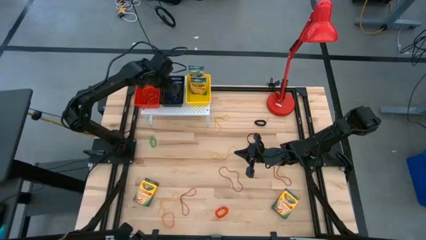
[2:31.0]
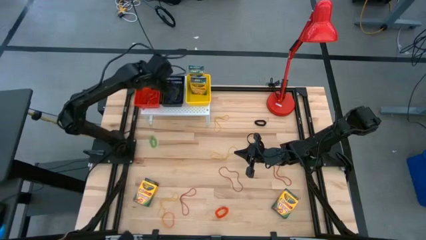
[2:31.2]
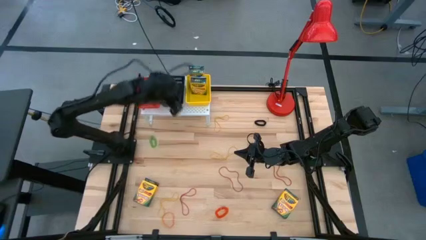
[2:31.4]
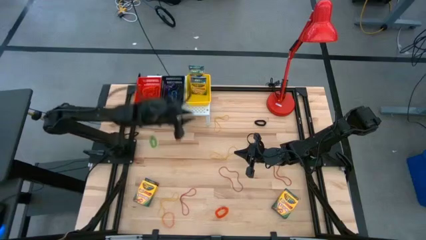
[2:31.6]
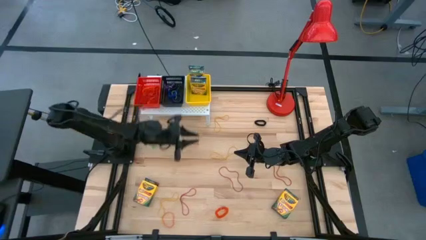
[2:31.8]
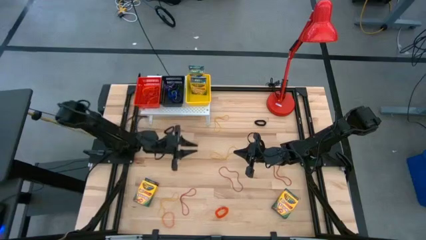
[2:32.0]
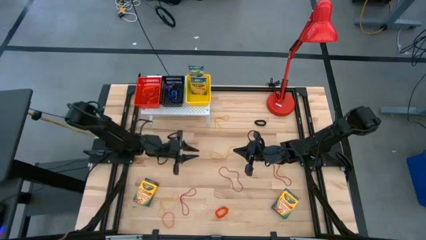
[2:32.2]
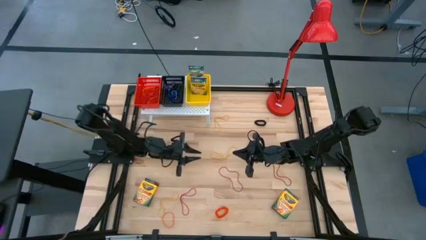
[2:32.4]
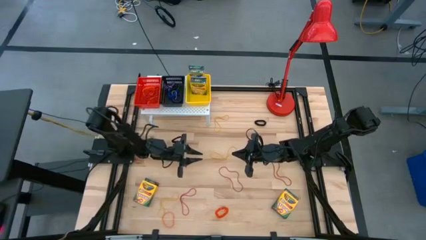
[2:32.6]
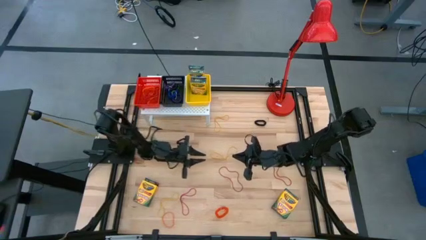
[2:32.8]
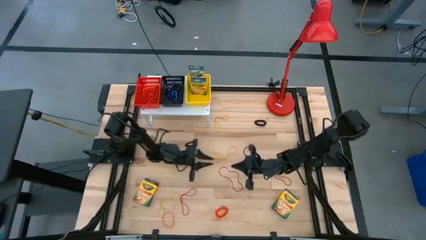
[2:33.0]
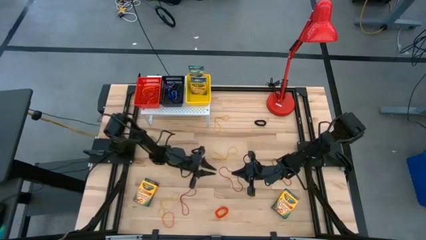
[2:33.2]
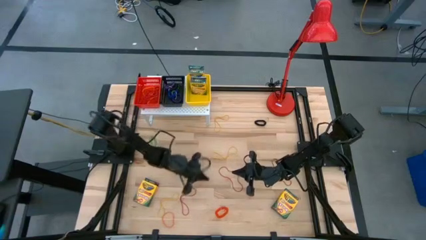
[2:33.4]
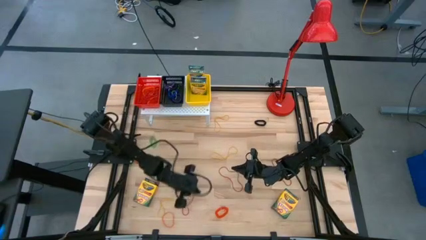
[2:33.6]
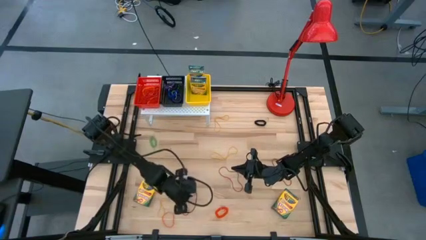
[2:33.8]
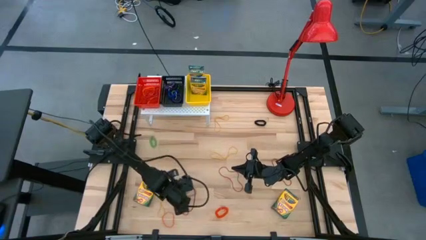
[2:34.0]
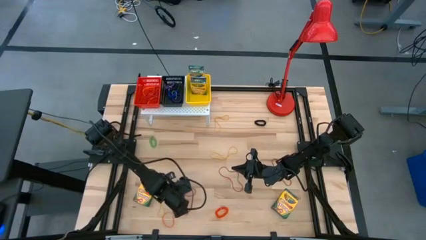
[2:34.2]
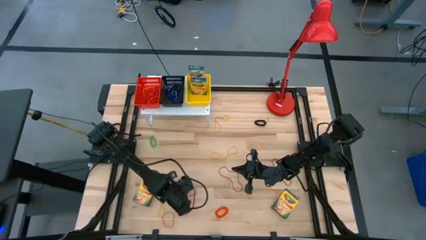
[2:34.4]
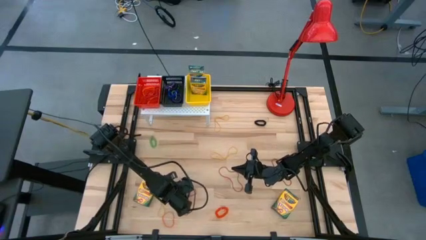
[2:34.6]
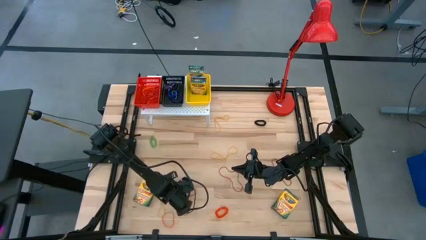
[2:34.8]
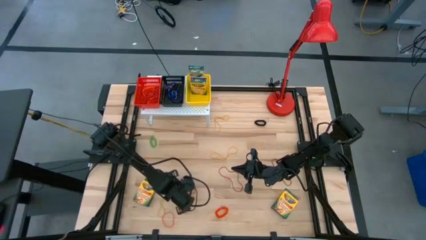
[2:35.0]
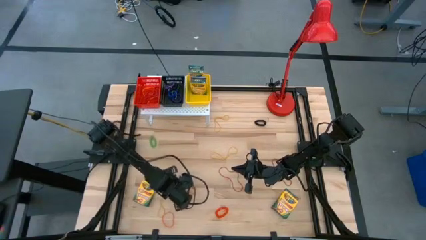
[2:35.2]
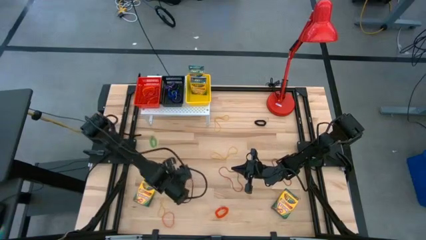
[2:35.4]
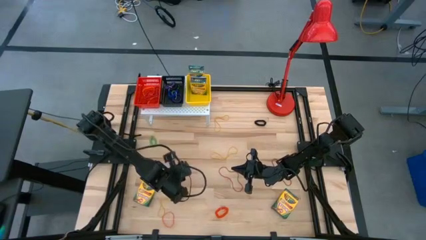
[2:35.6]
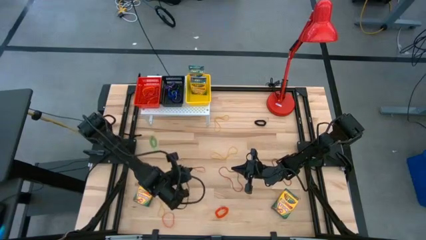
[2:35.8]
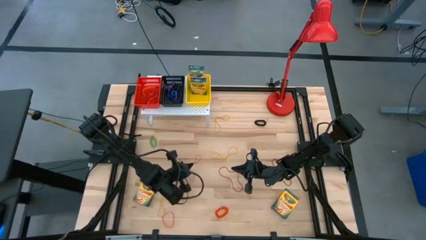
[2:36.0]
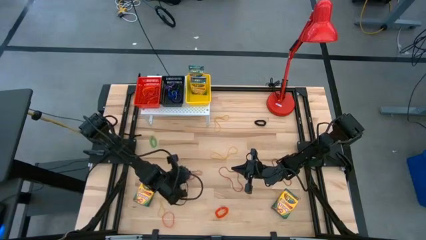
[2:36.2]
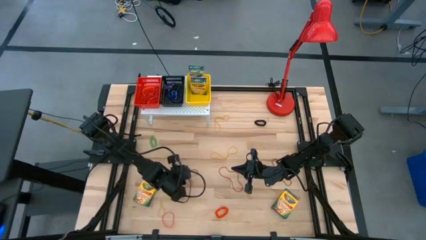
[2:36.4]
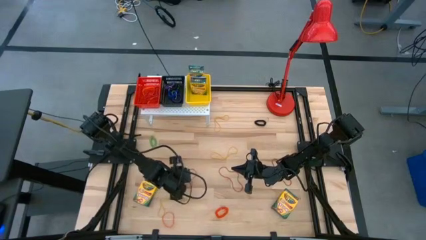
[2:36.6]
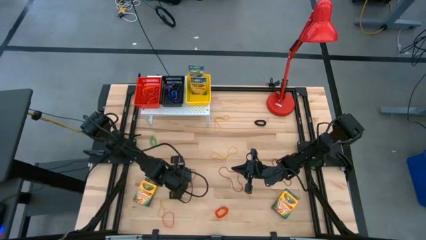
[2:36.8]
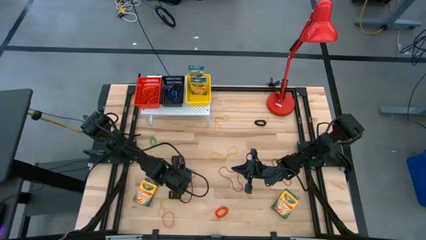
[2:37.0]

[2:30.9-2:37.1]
Task: Pick & Place Office Desk Supplies
Put the red rubber band into the red bin on the shelf

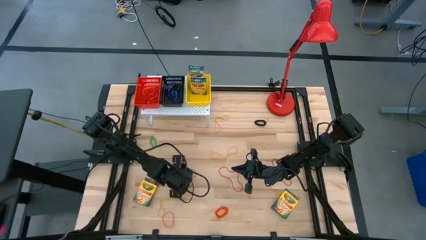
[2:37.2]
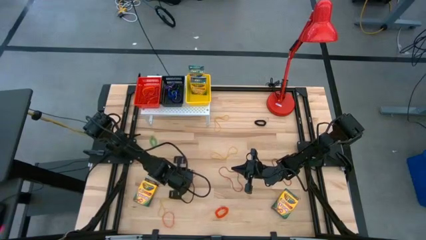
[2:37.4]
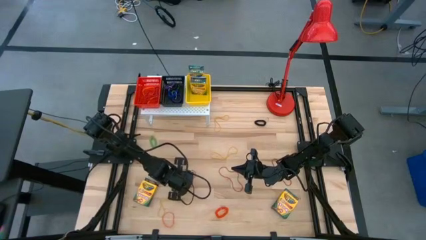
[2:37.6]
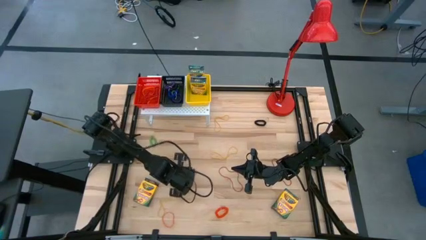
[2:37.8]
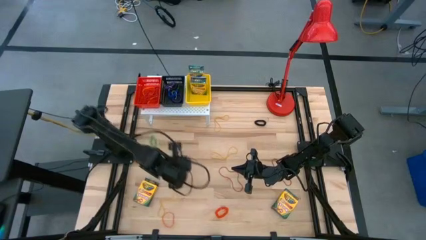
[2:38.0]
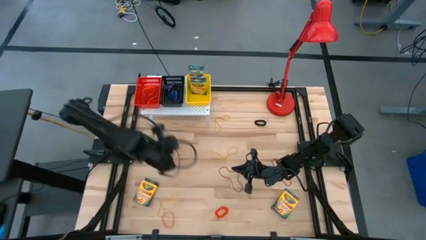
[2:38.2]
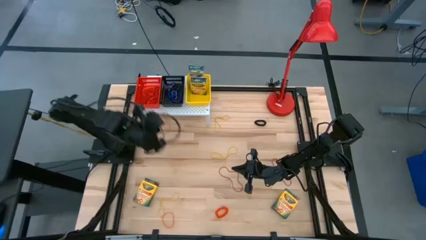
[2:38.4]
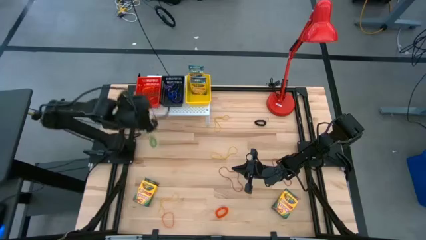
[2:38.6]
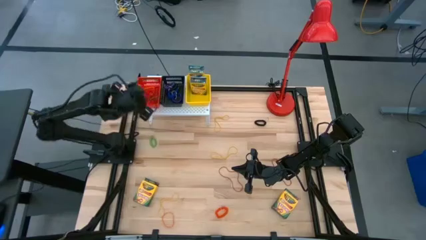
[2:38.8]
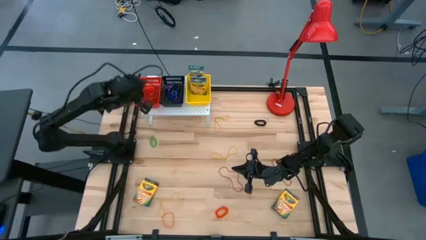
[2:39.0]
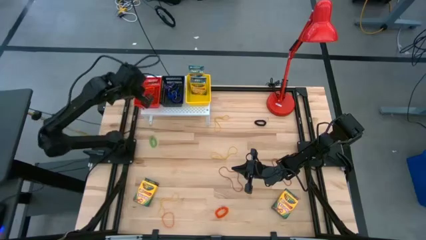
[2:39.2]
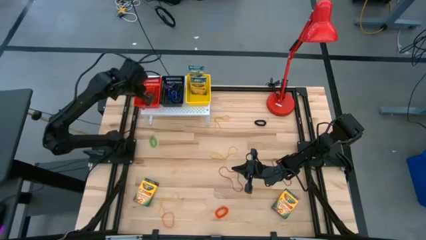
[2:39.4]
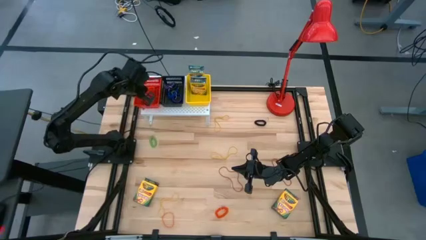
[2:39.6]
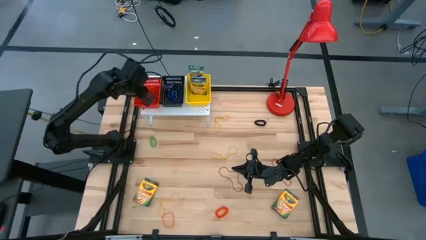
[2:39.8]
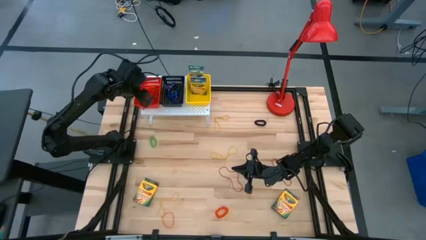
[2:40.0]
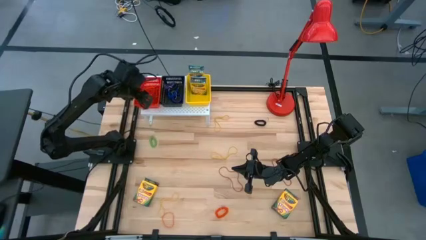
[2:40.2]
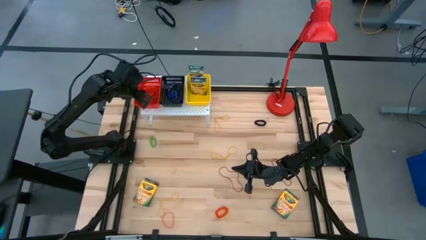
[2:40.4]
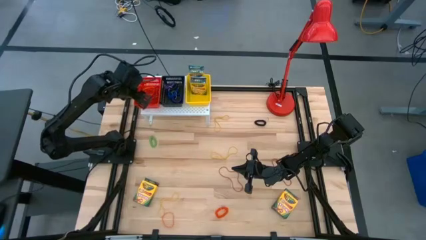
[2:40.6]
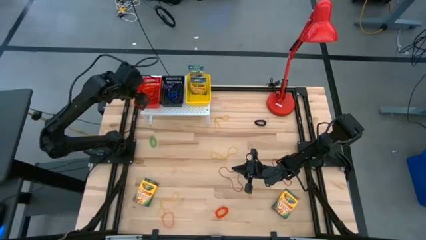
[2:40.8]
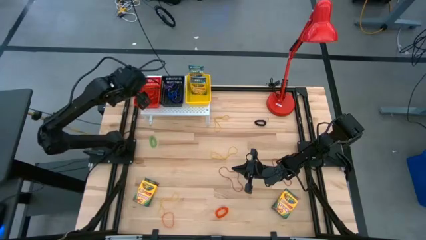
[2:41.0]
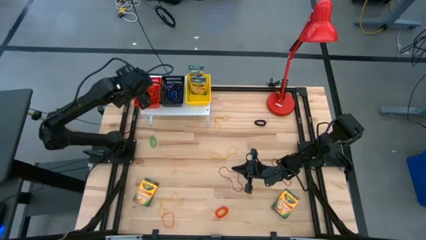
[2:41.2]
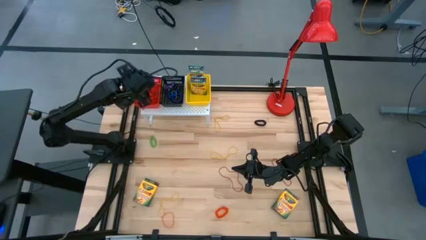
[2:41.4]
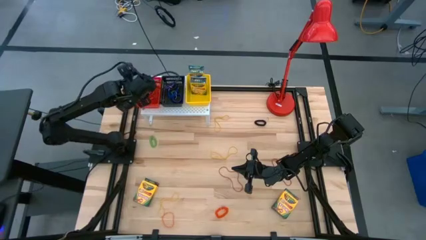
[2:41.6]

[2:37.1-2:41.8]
Put the red rubber band into the red bin on the shelf

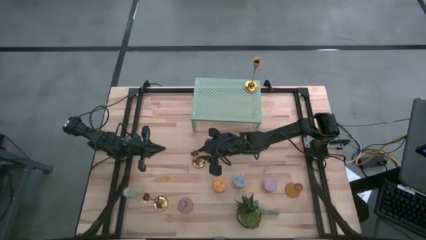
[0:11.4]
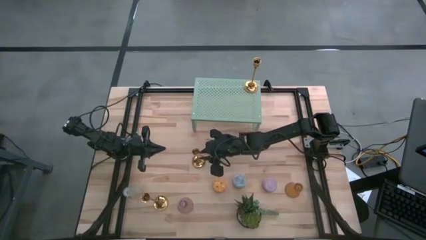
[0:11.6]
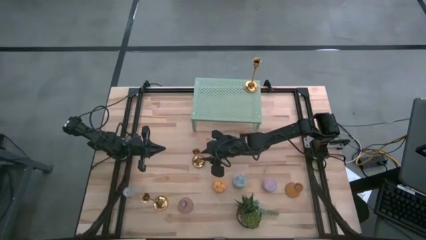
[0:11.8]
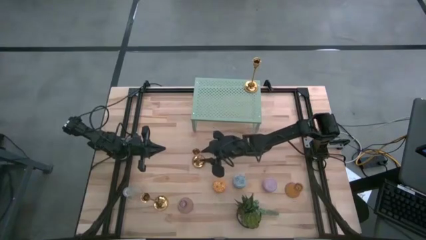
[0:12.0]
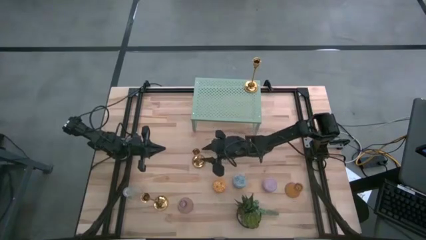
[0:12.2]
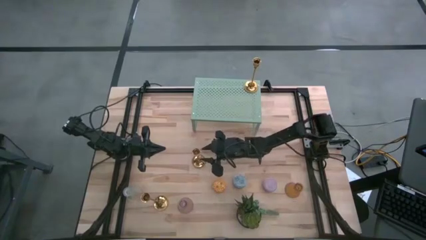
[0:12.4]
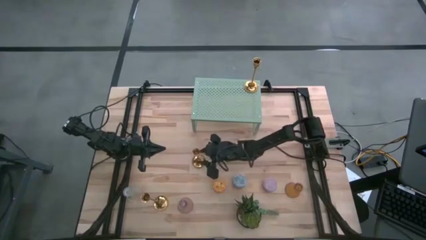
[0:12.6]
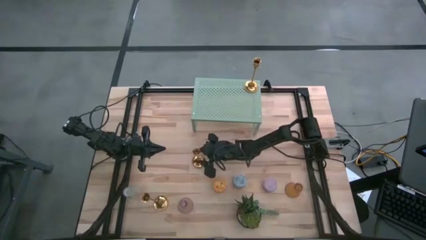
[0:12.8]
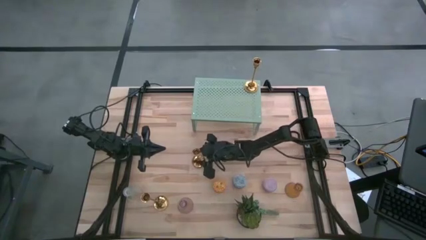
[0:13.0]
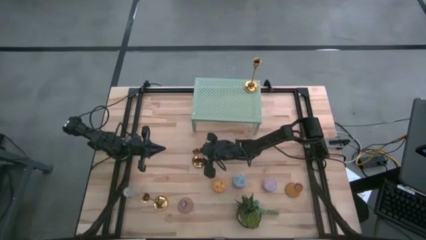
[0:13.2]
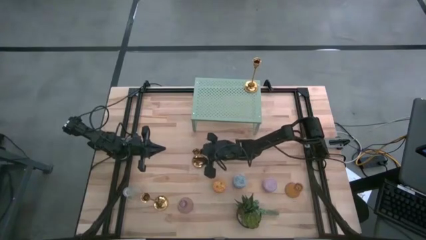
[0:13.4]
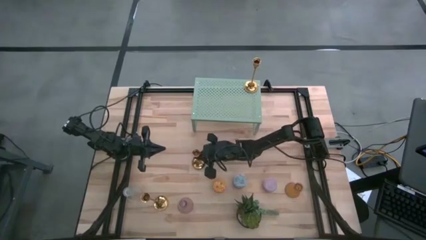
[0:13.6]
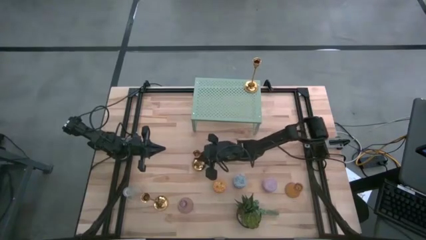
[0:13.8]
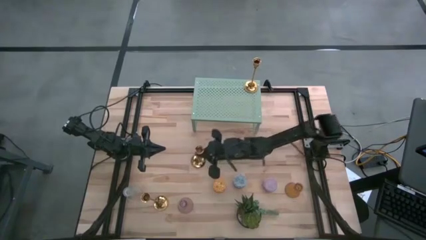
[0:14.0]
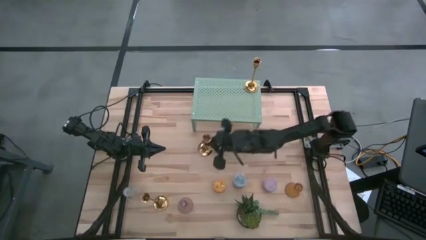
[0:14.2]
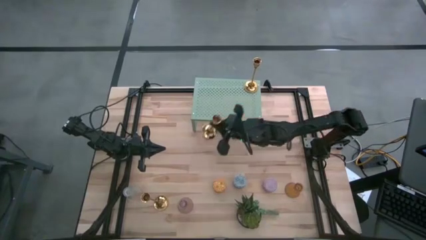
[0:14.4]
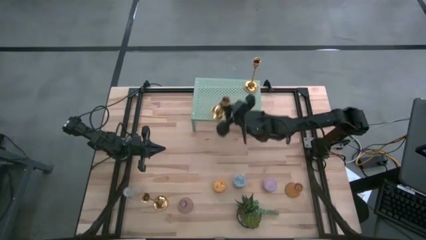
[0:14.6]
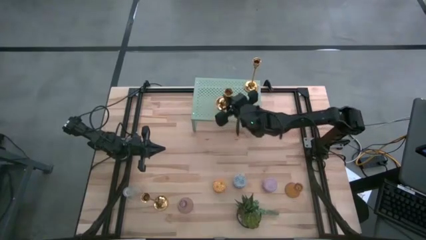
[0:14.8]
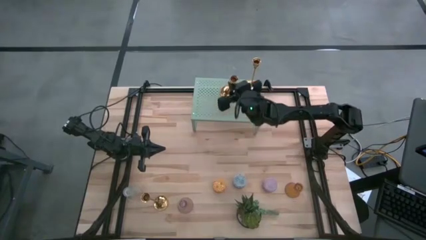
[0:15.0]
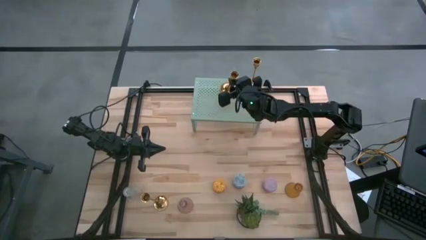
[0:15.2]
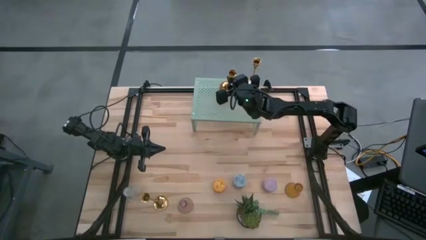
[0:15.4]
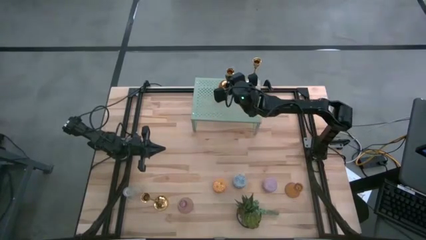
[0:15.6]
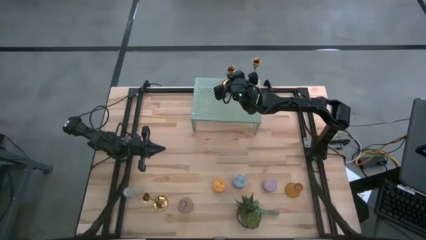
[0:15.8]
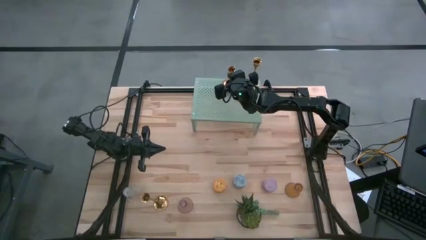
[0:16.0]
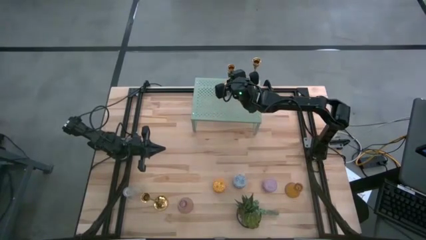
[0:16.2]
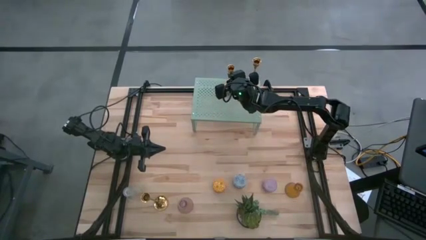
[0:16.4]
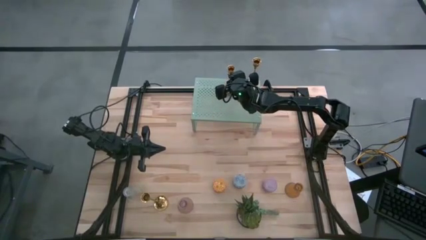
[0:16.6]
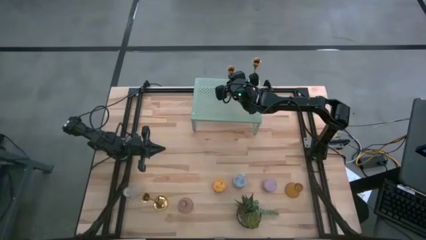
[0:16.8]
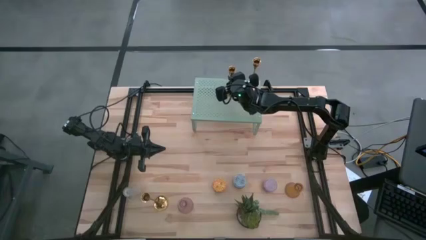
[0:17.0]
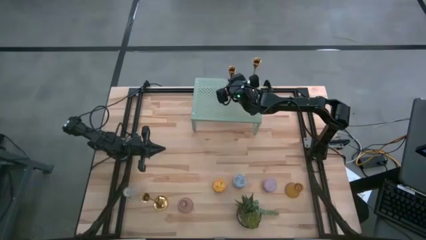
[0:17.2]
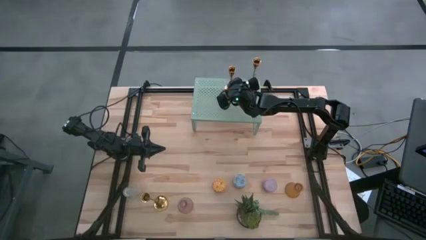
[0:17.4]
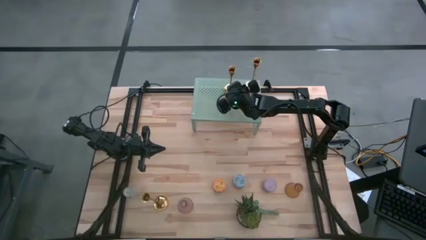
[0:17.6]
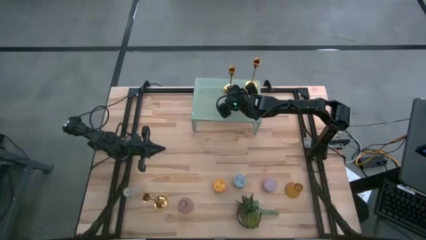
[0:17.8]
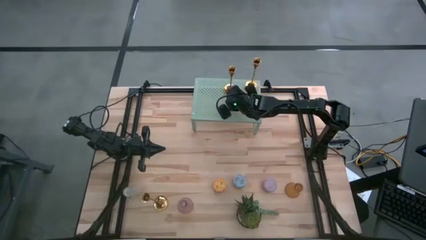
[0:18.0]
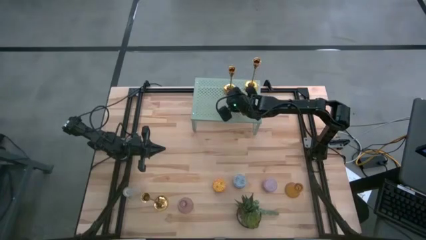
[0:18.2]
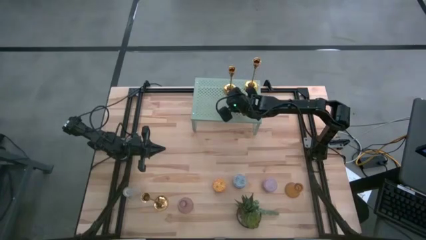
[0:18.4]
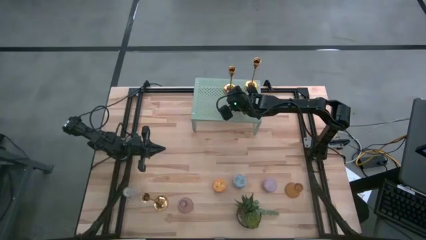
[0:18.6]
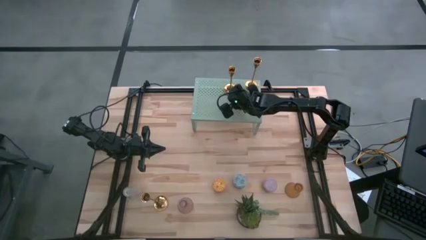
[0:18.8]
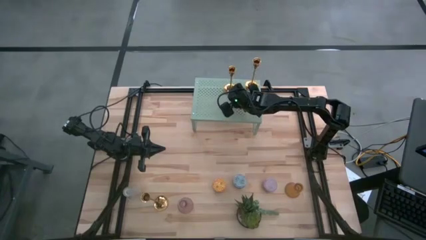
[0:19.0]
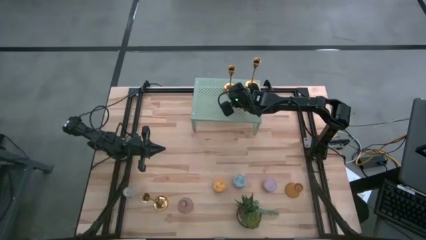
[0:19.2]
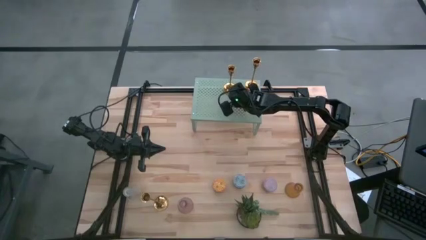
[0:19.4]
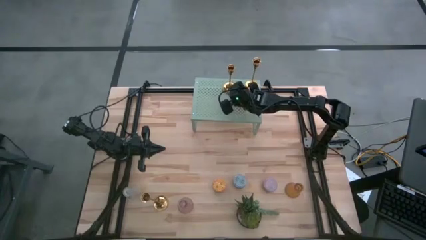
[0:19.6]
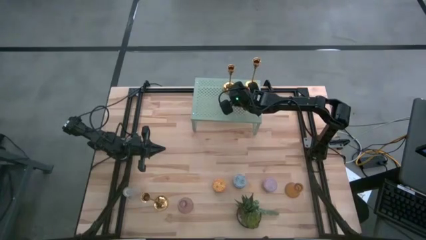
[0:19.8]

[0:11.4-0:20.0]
Task: Pick & Place candle stick holders
Put the top gold candle holder on the shelf
